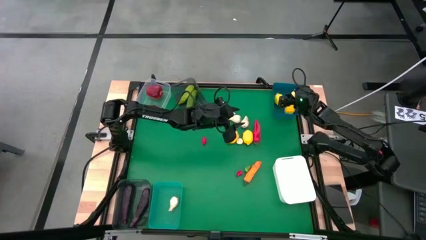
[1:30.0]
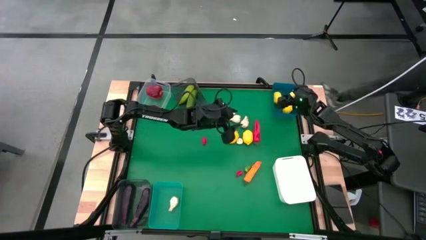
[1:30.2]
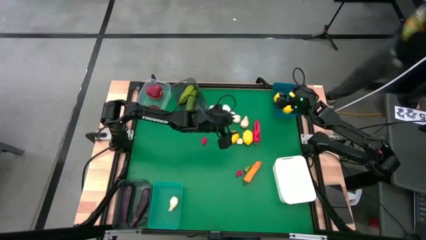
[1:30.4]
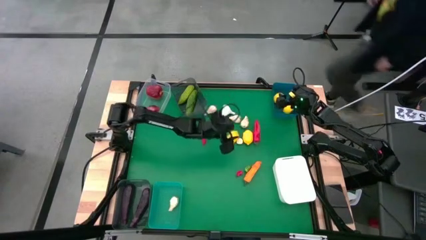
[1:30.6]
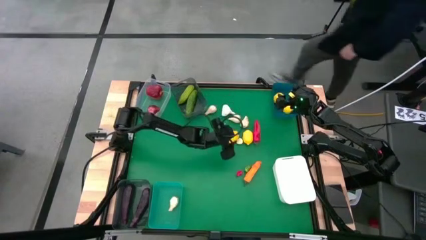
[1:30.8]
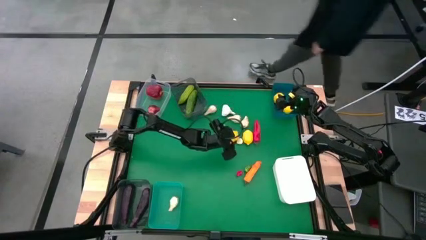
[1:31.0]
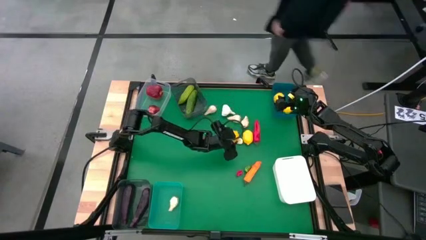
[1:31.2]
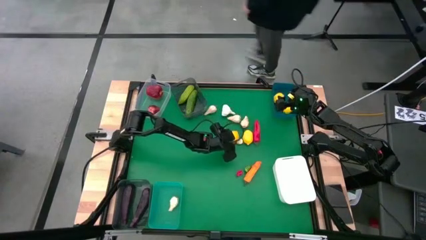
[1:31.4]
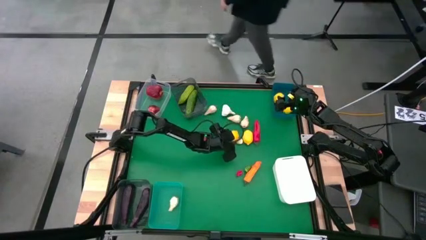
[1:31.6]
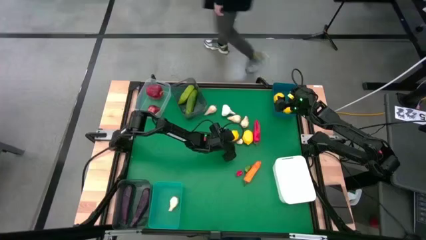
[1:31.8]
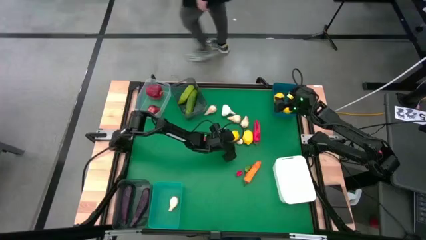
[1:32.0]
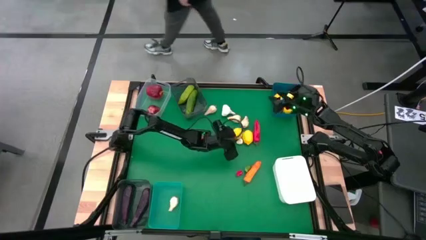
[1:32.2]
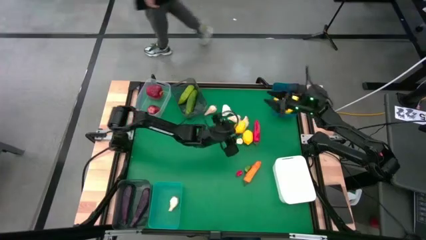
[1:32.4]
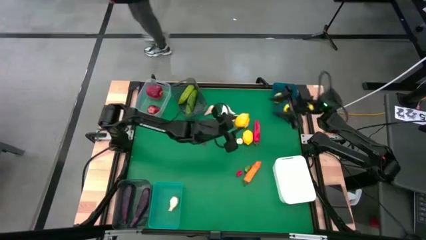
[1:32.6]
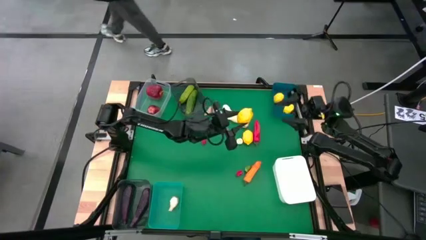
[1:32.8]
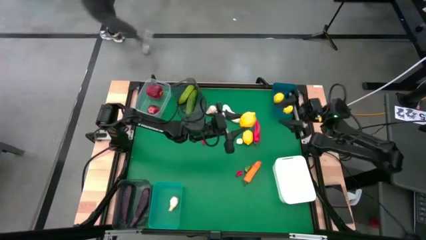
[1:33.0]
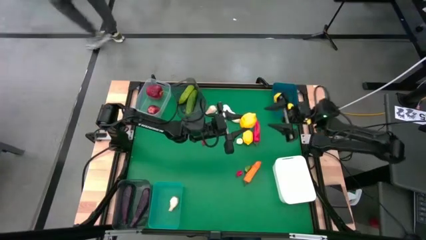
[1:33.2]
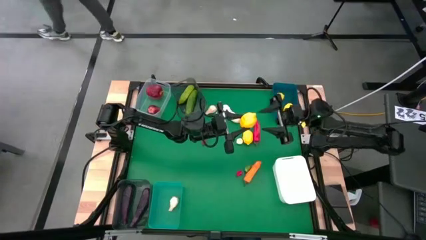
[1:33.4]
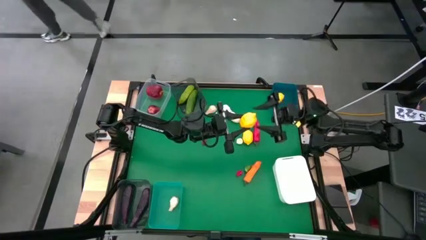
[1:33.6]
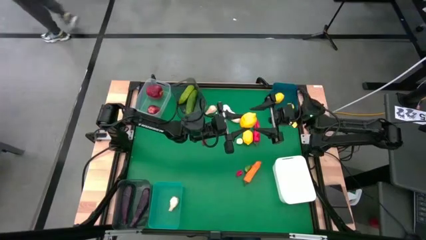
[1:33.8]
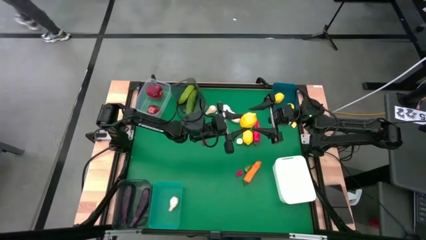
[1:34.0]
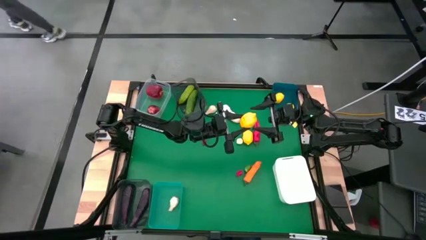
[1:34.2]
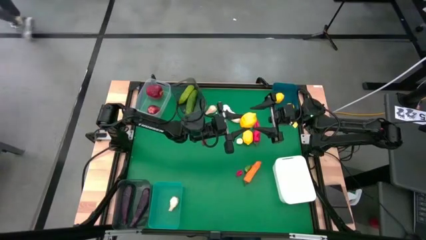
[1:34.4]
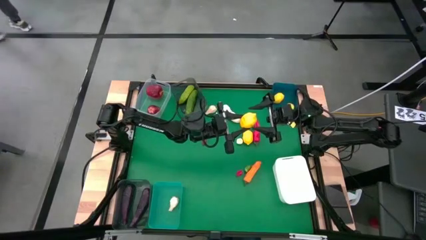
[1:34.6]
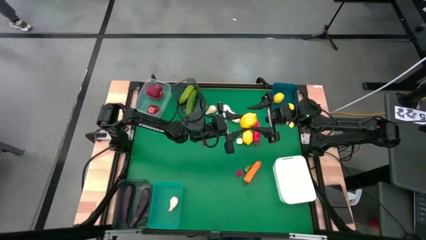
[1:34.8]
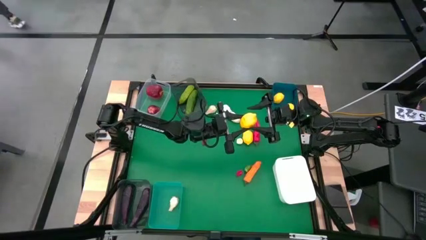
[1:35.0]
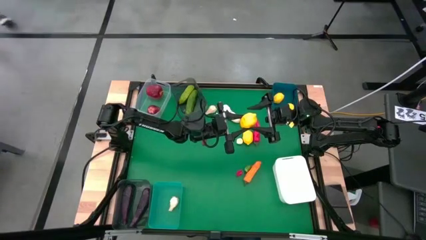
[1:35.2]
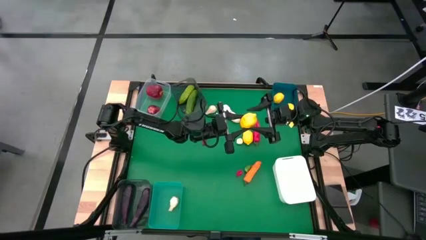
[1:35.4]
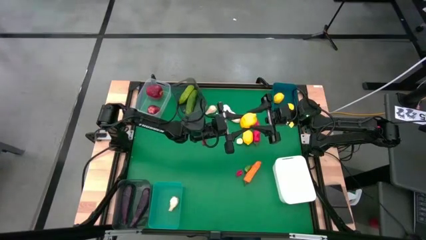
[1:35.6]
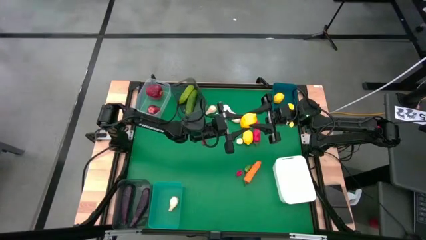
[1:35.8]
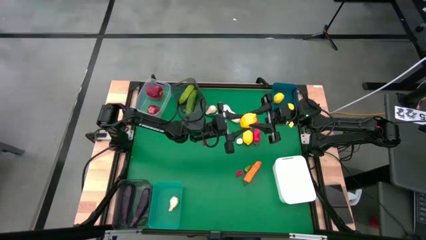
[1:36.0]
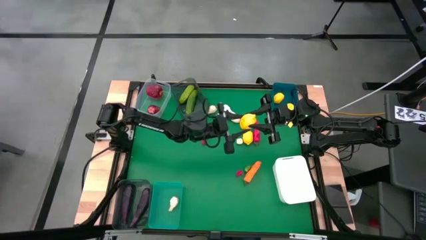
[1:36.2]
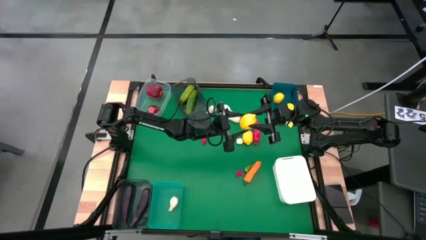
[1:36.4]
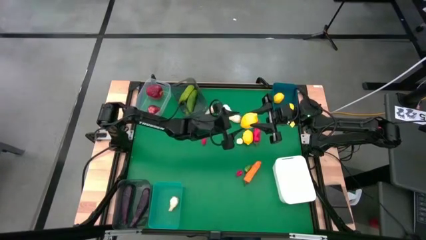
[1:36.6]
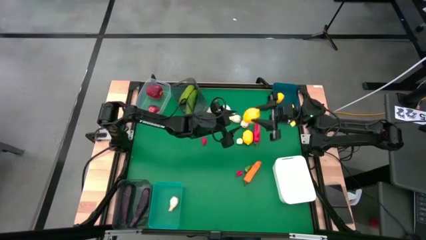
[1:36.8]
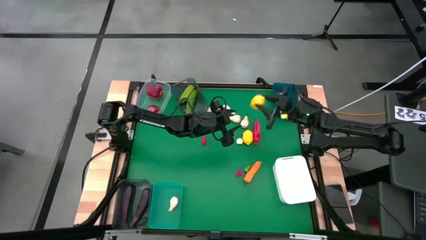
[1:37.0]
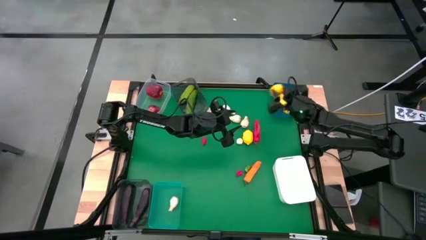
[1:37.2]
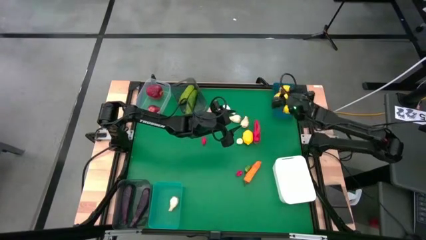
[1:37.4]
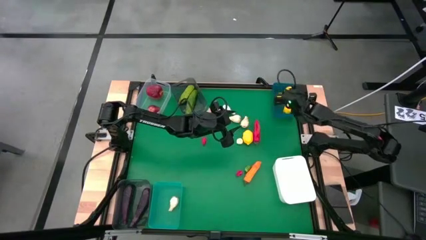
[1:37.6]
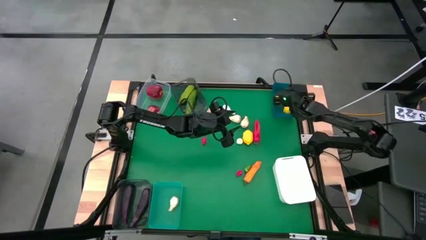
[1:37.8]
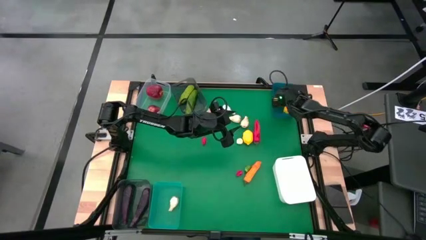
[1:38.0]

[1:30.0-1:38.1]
Task: Sort produce into baskets
Put the lemon into the blue bin

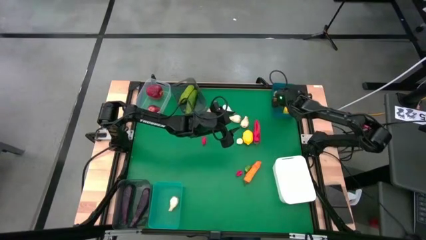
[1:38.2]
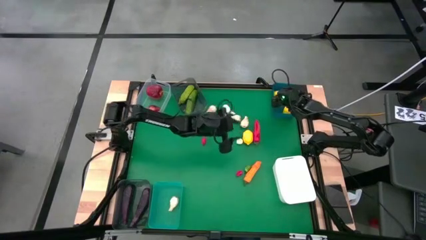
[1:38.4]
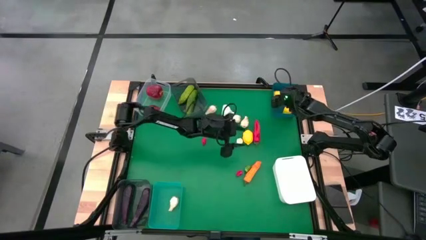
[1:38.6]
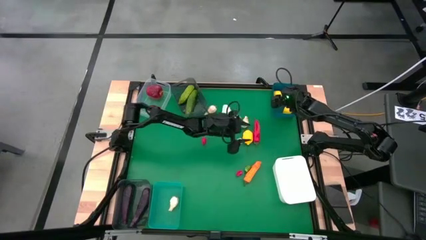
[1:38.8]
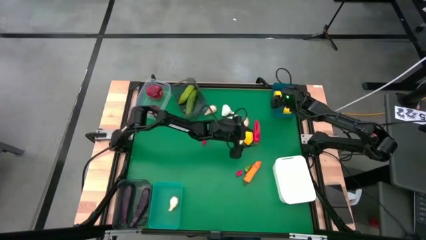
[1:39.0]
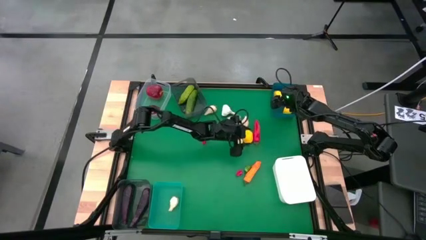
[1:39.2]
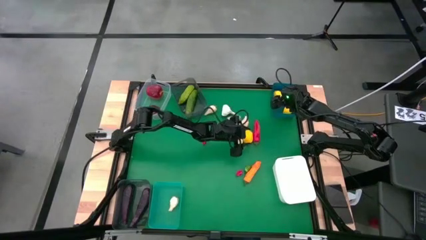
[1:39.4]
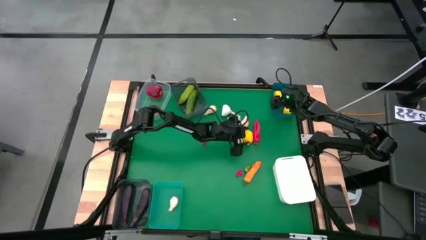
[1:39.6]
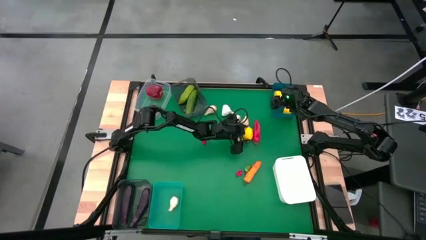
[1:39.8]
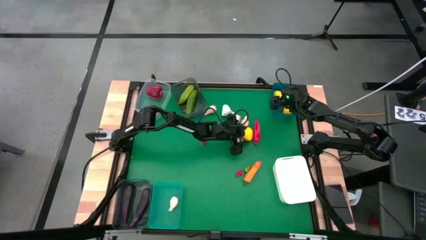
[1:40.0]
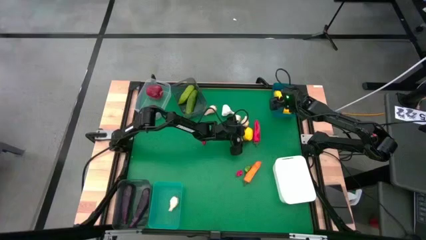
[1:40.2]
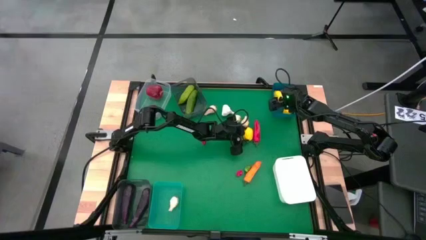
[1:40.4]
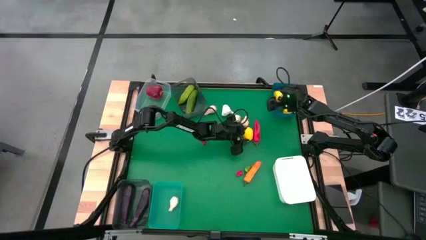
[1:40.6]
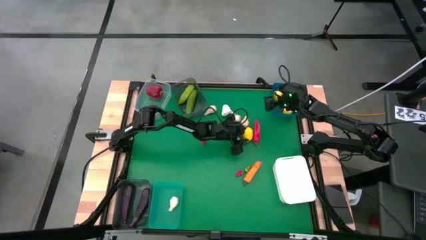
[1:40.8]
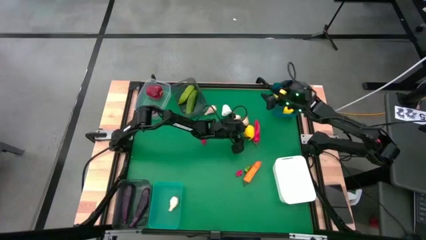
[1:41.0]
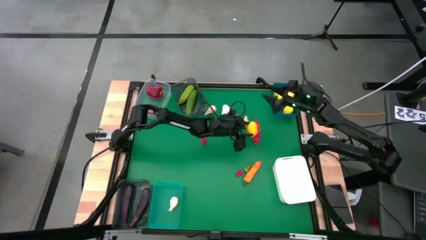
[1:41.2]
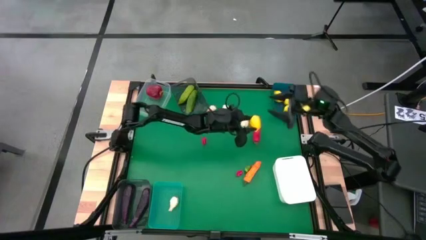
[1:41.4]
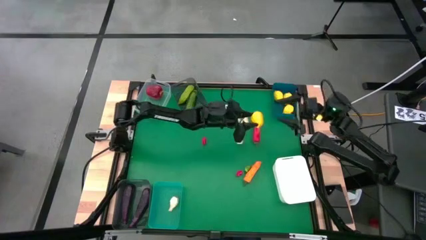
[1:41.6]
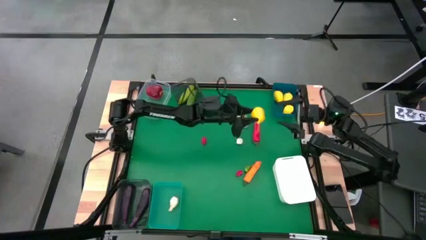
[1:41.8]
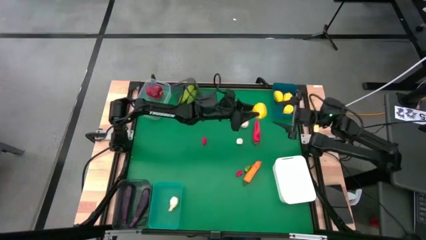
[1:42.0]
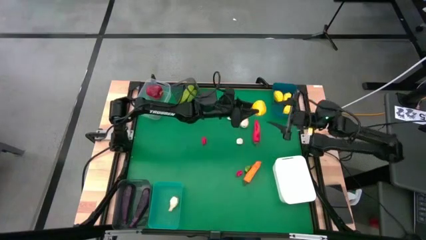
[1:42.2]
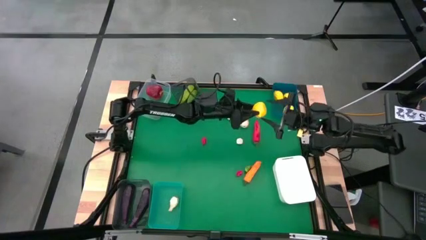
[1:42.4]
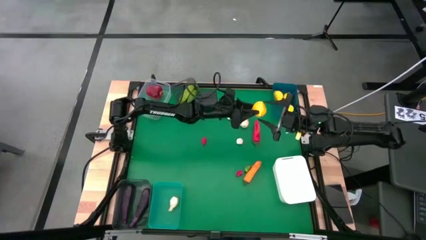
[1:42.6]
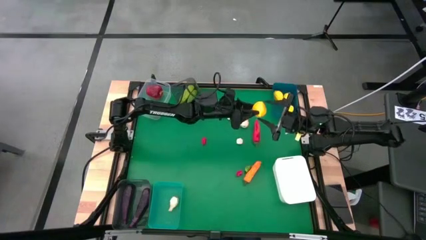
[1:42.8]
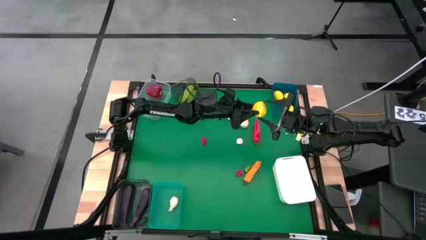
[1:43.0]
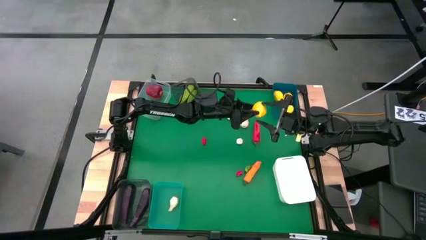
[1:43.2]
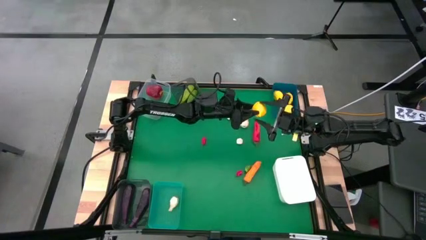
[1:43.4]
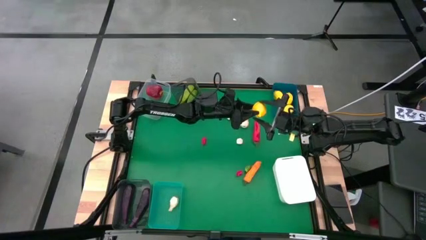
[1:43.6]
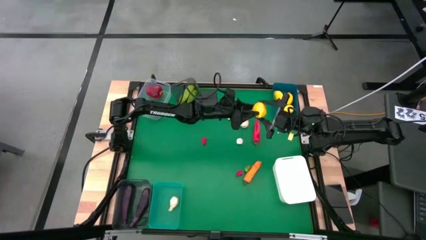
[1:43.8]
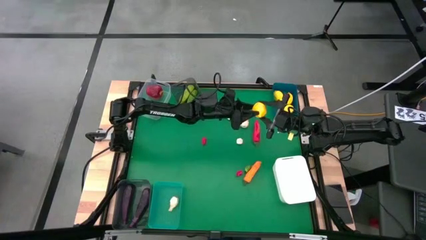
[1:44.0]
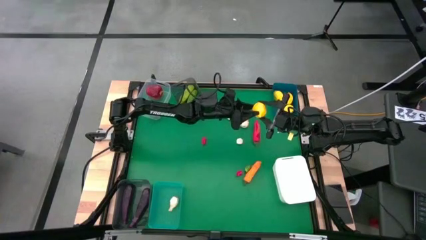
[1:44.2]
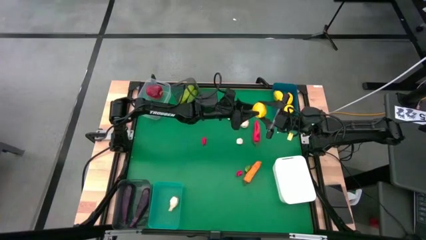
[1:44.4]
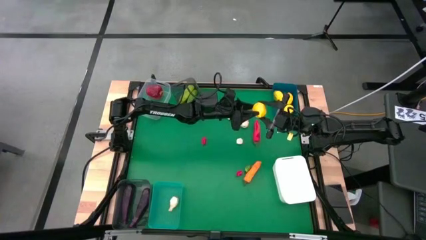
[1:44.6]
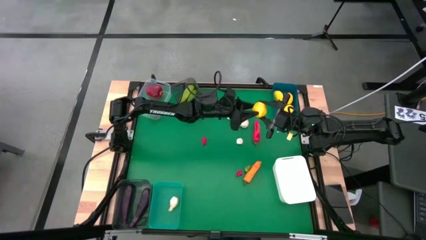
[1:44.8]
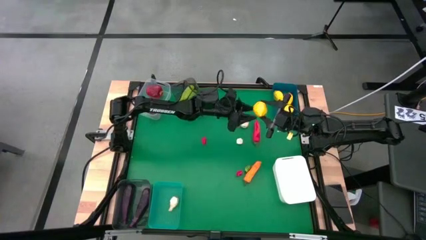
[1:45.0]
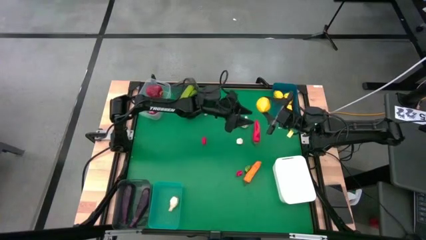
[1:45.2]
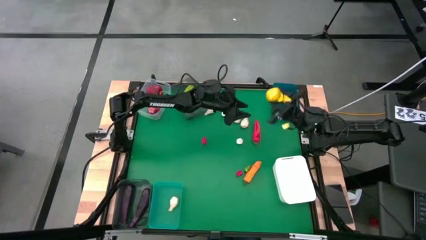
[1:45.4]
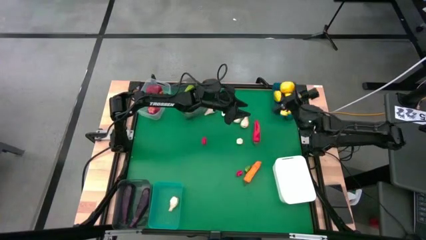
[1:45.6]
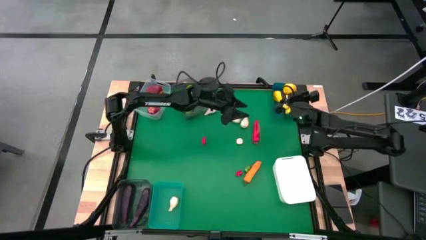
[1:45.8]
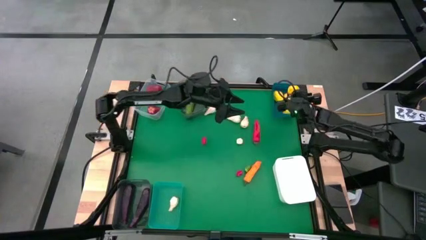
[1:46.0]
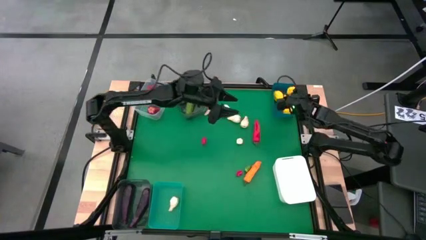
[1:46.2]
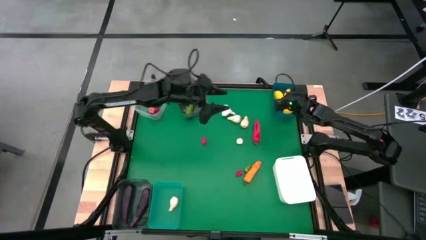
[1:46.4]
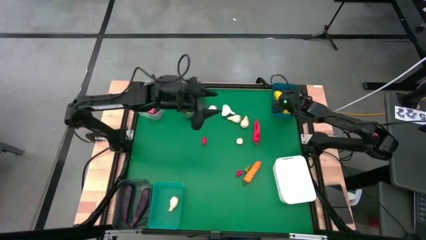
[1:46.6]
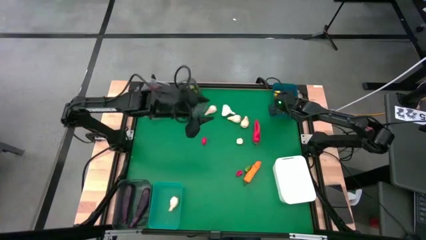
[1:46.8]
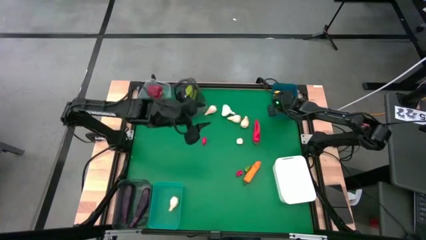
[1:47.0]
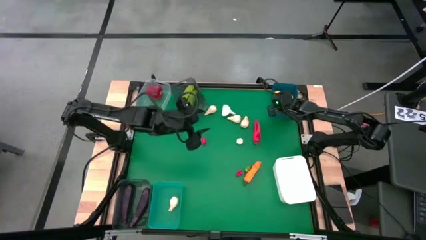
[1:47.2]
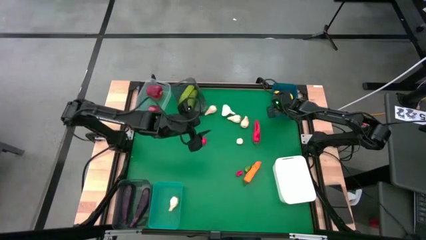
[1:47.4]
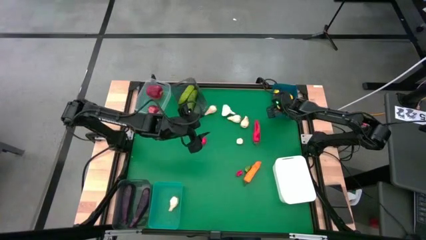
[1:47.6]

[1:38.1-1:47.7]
Put the lemon into the blue bin
